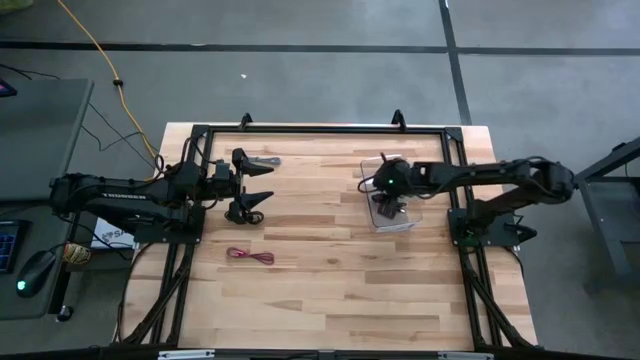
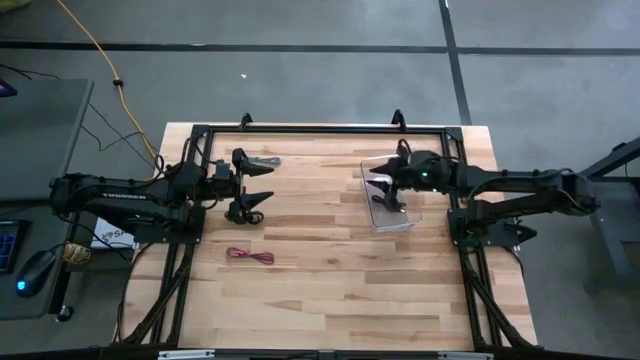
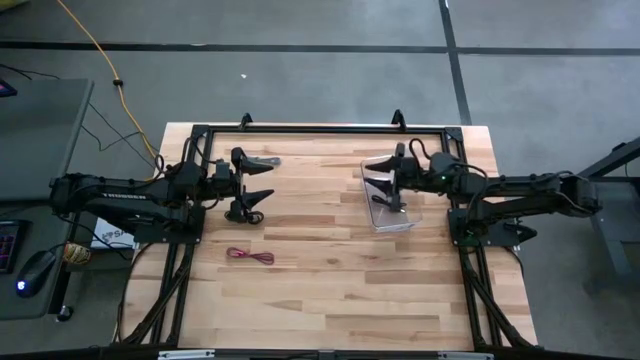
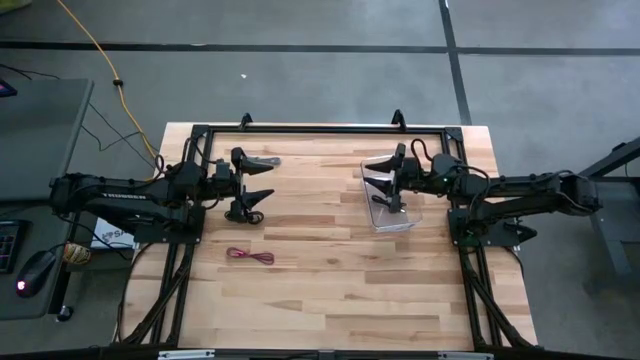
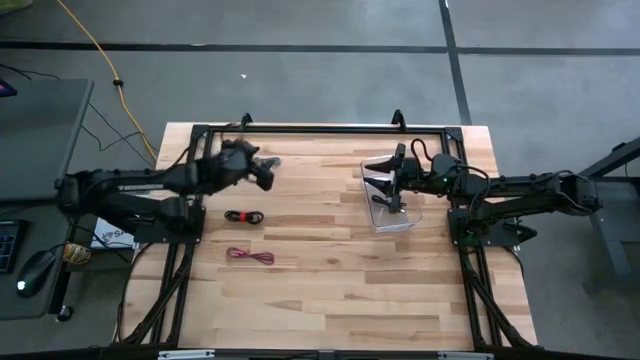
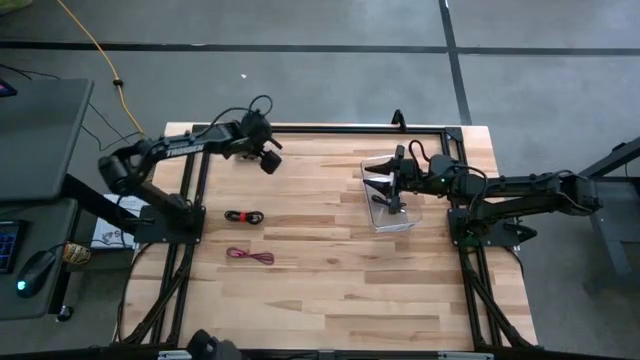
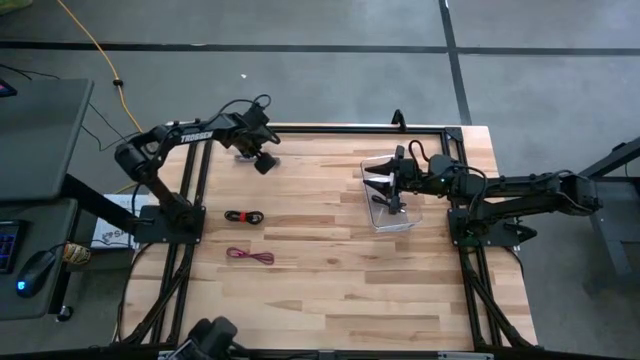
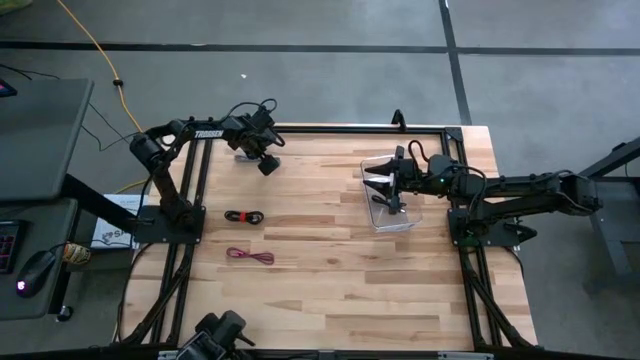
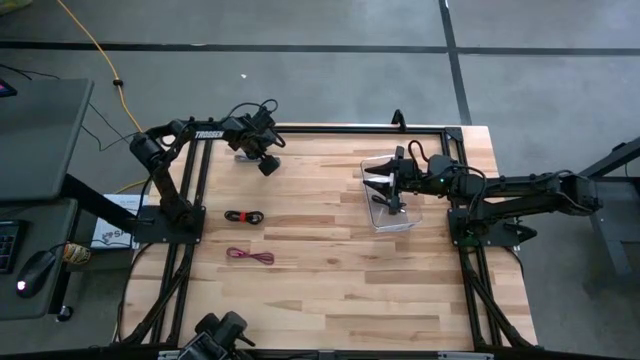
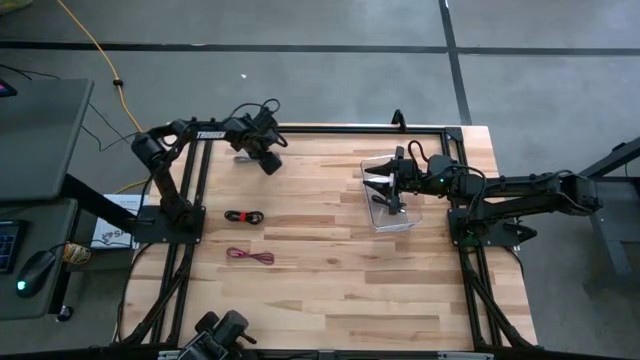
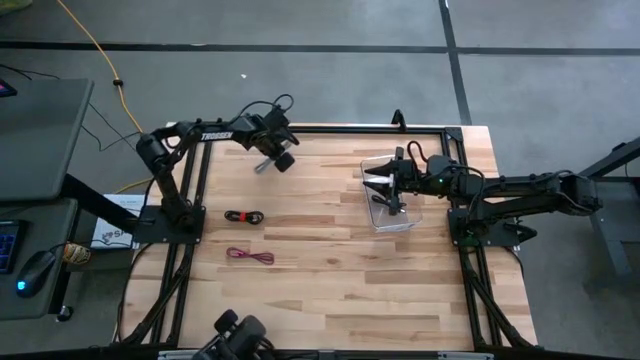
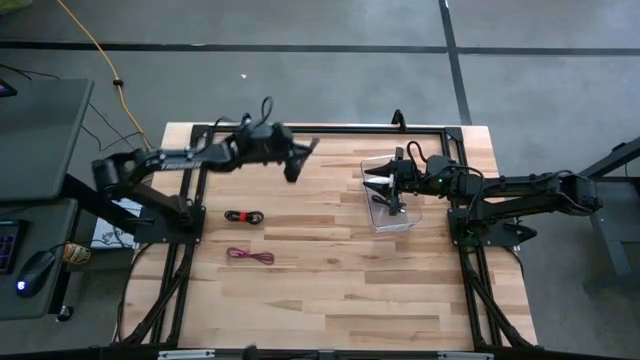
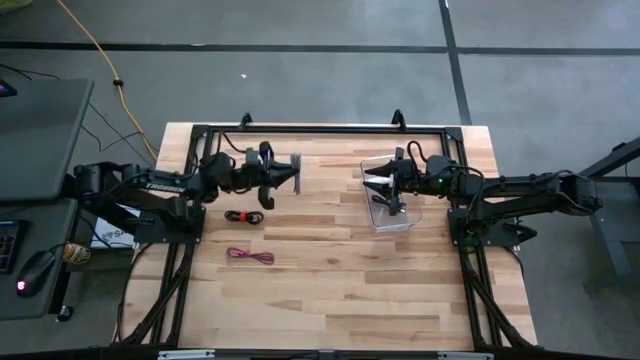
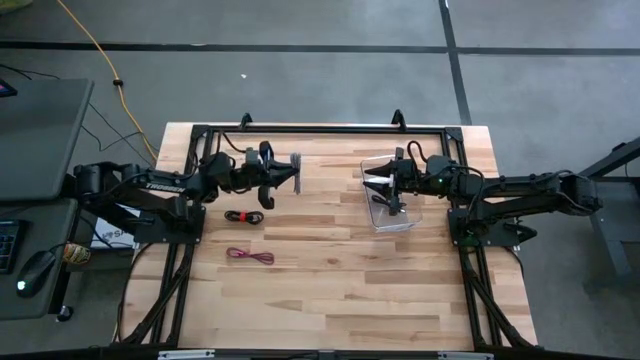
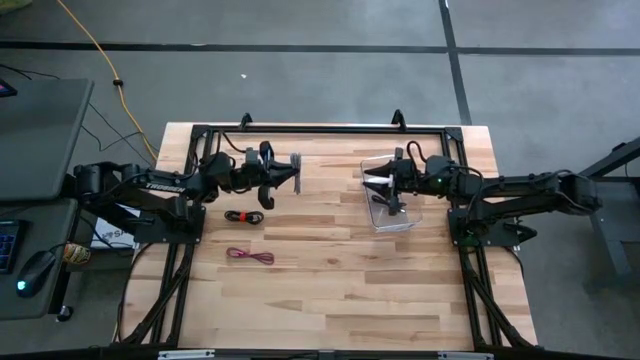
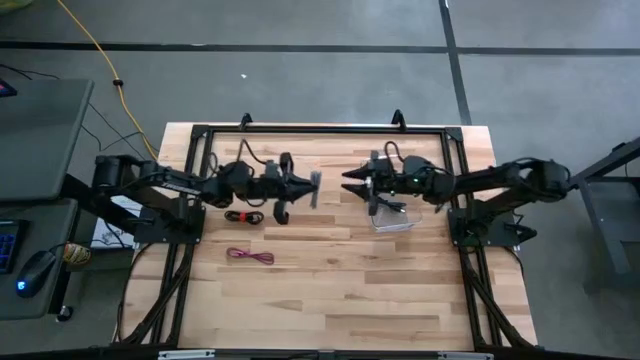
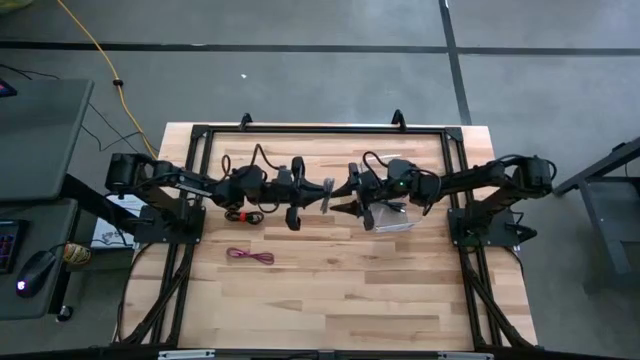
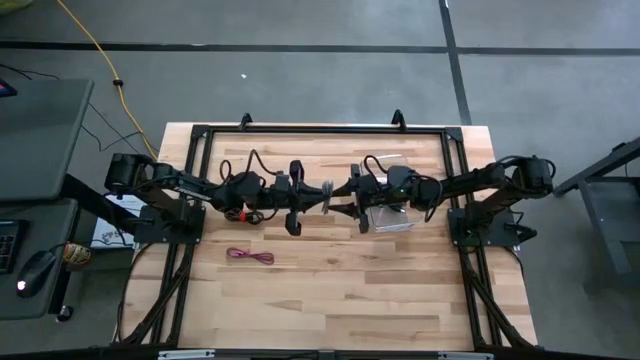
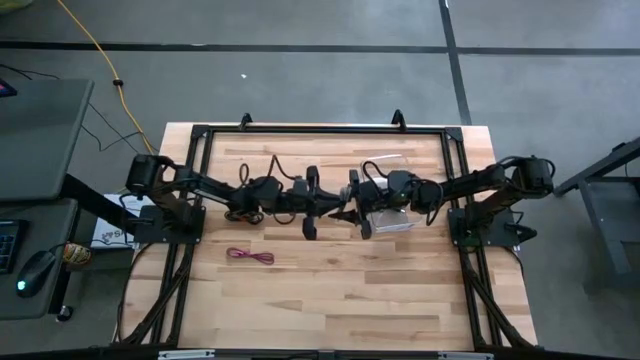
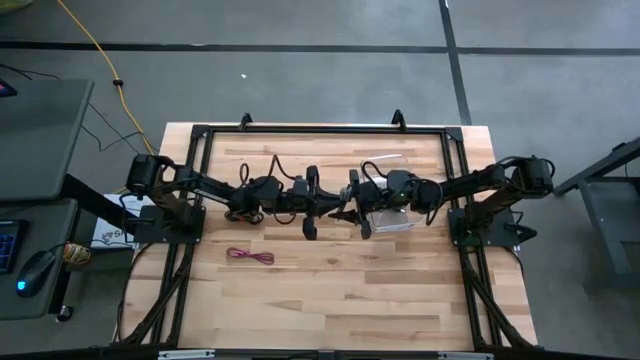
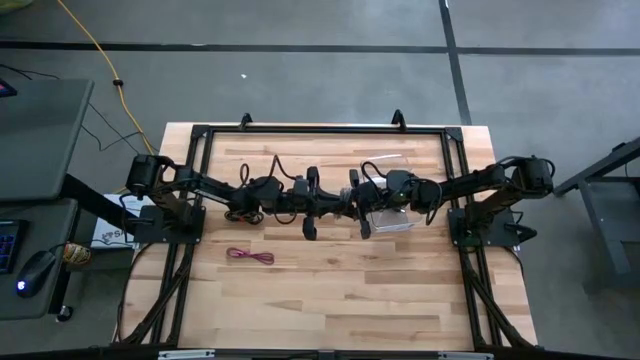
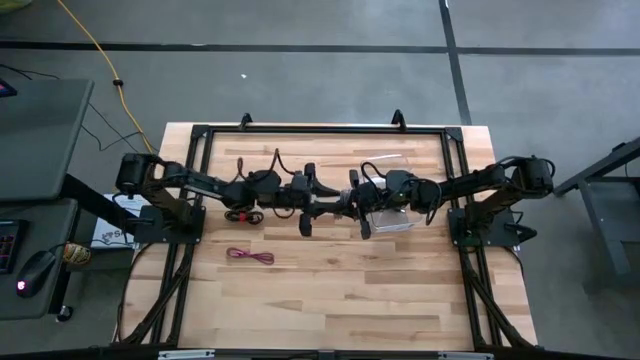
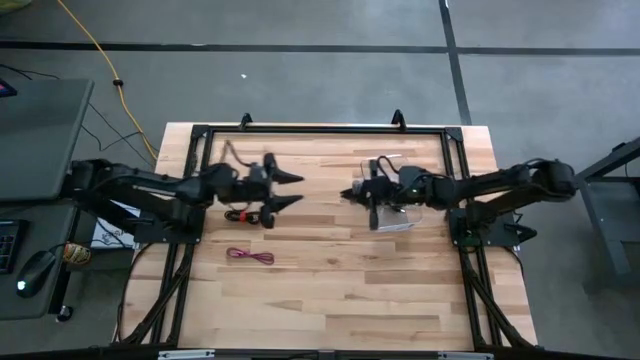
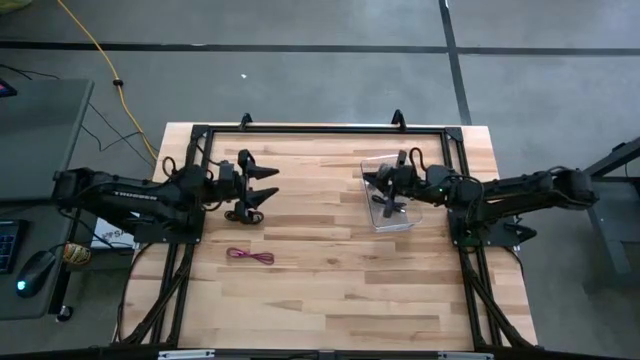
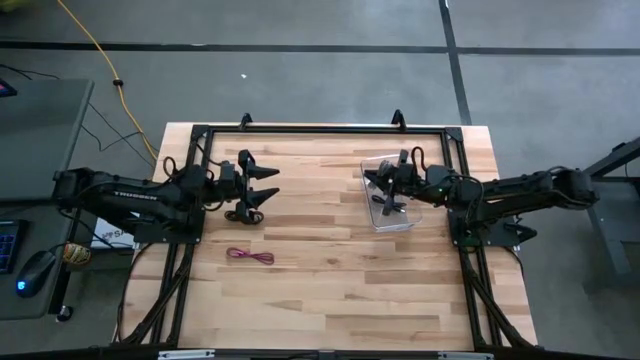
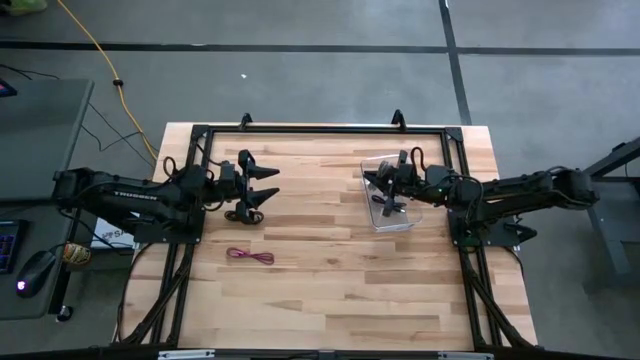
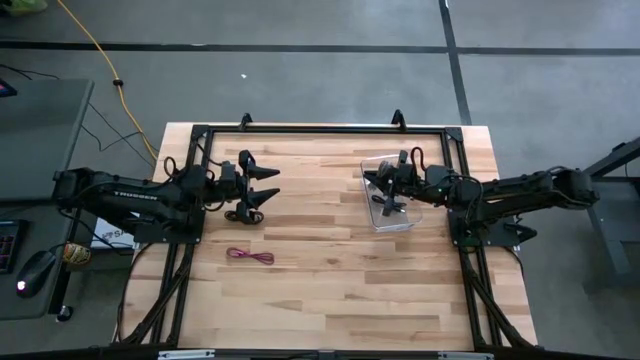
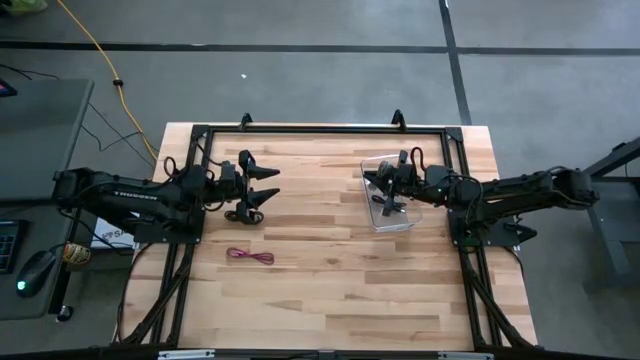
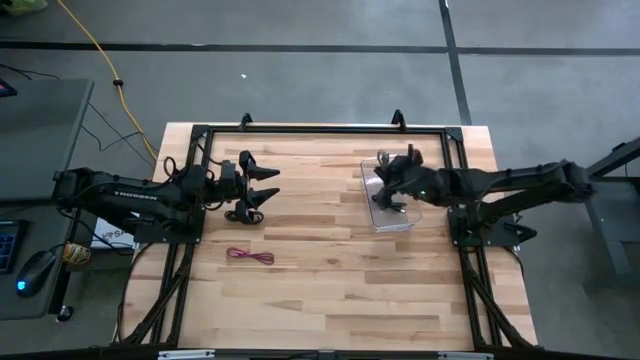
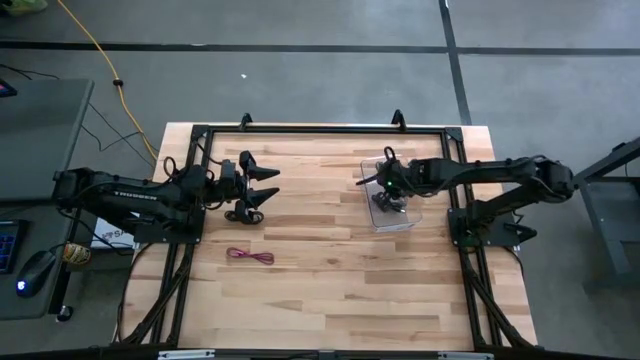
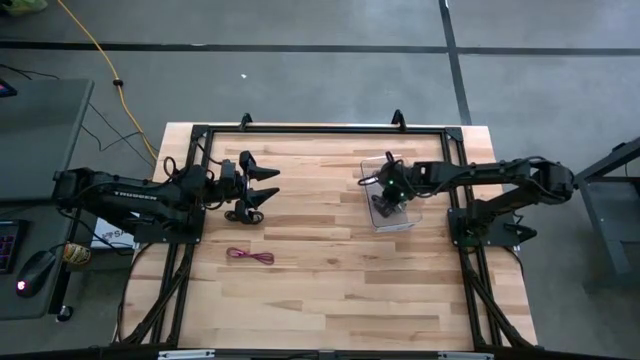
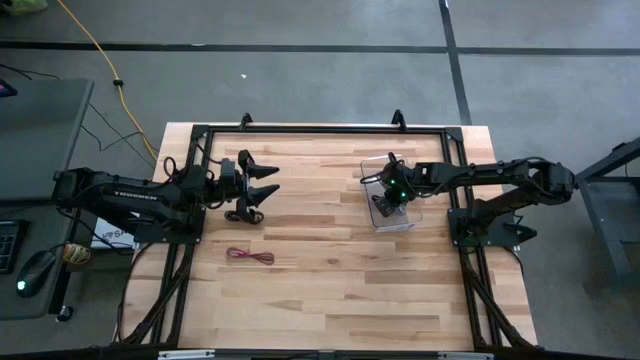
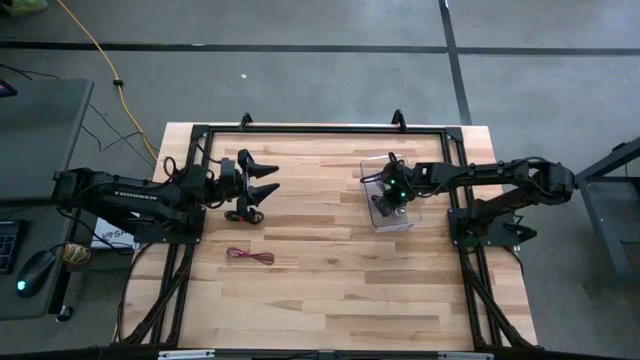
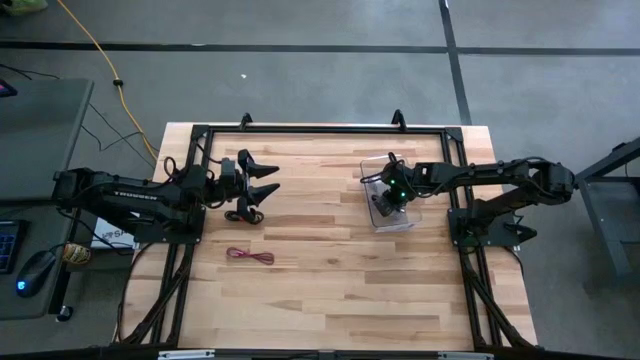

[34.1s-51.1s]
Task: Pick and place USB-C Cables
Put the white cable charger into the transparent bin

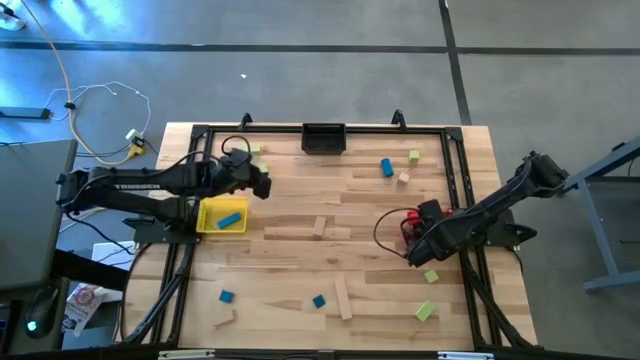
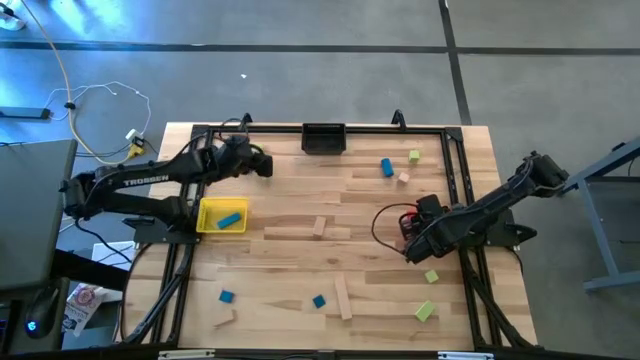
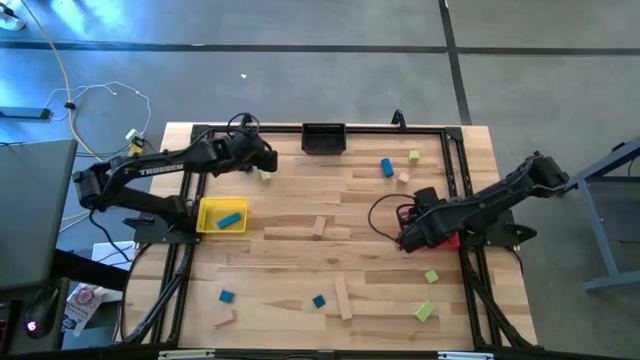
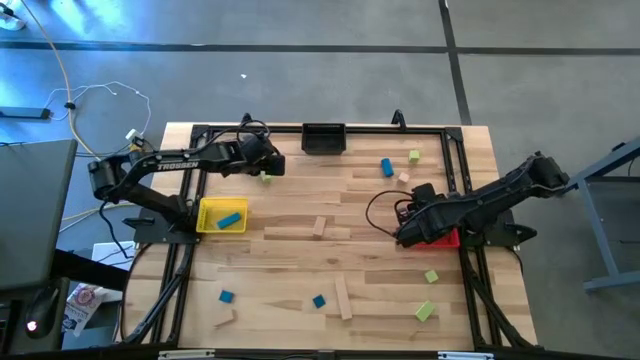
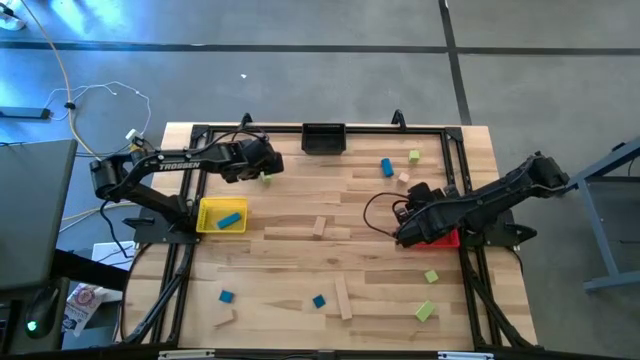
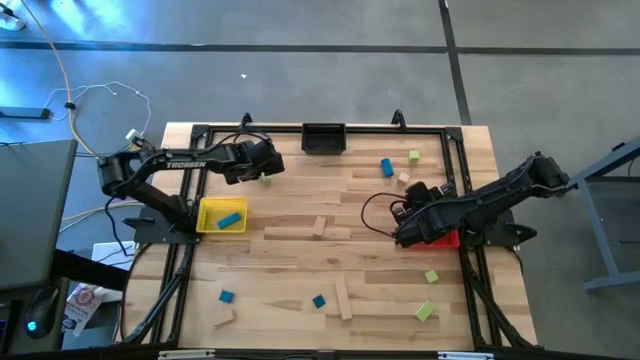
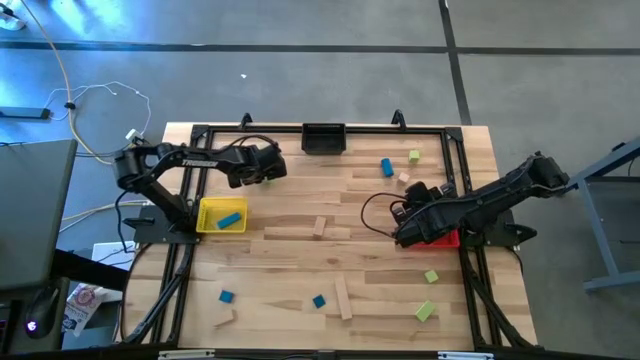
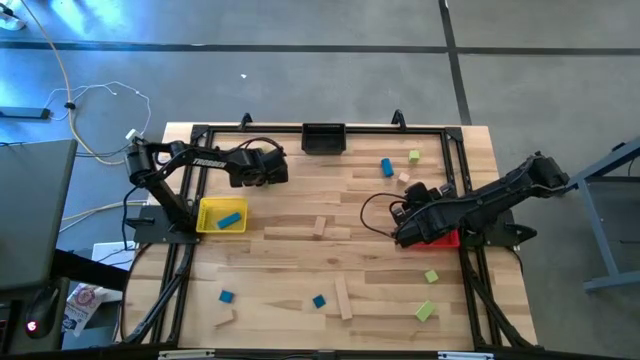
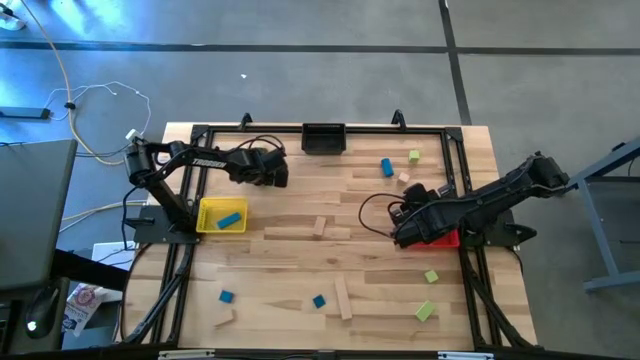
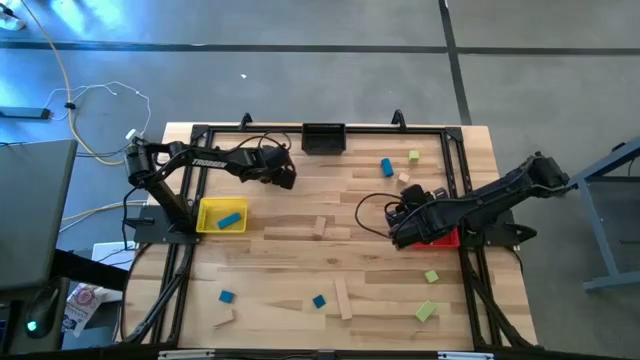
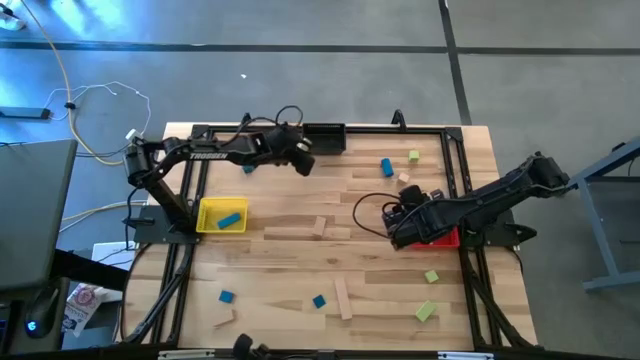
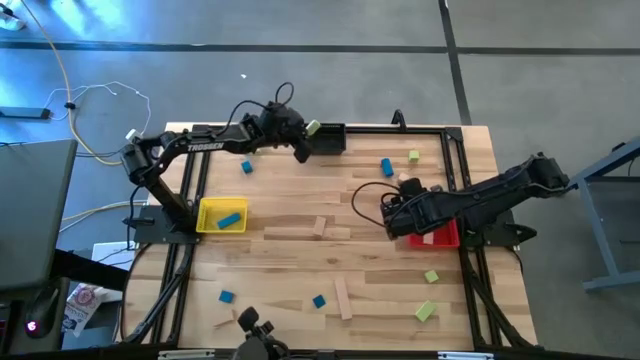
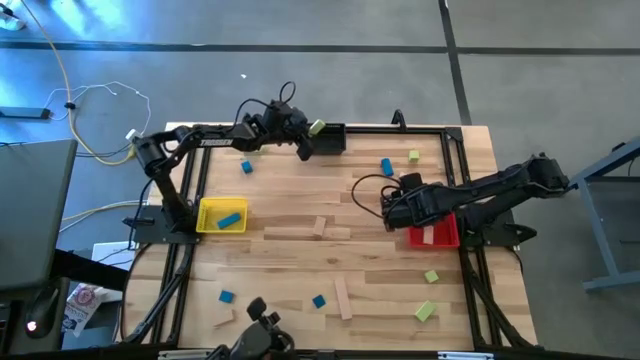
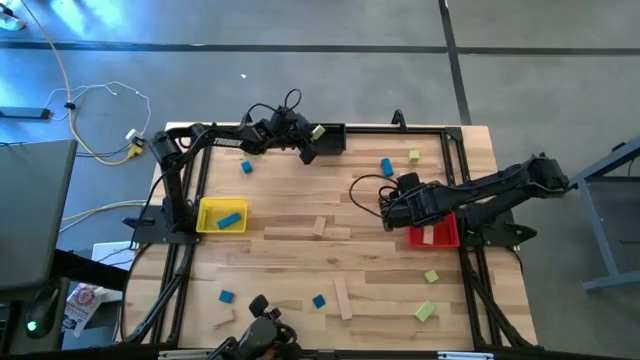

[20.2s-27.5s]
Task: Sort & place blocks by color
Put the light green block into the black bin
